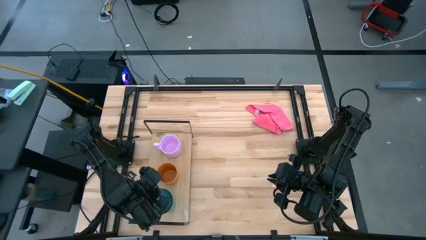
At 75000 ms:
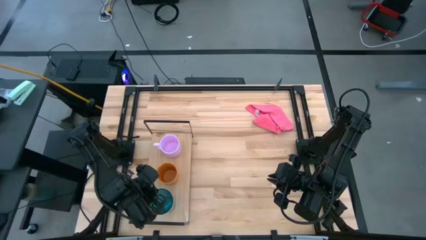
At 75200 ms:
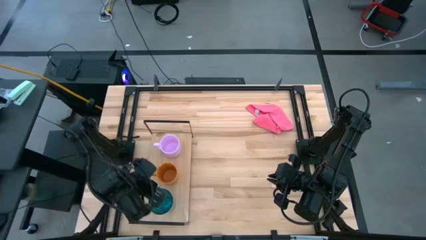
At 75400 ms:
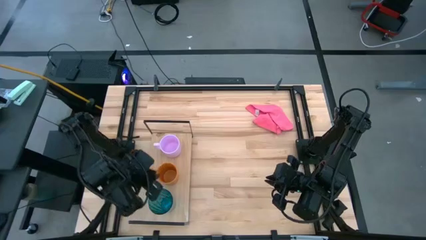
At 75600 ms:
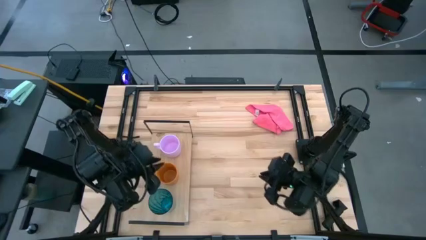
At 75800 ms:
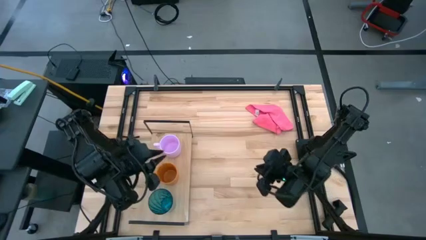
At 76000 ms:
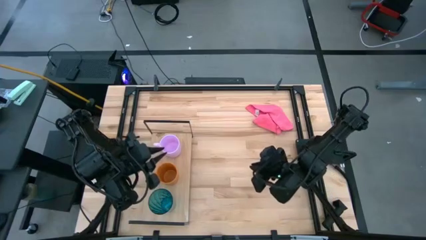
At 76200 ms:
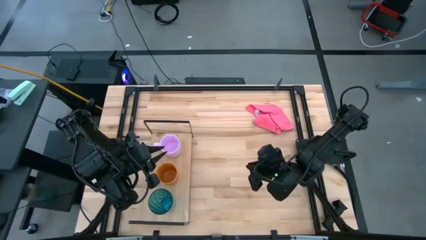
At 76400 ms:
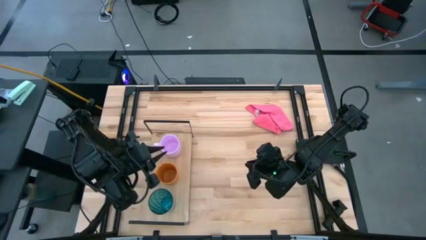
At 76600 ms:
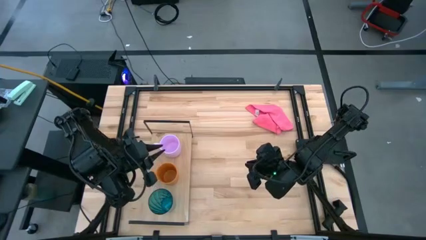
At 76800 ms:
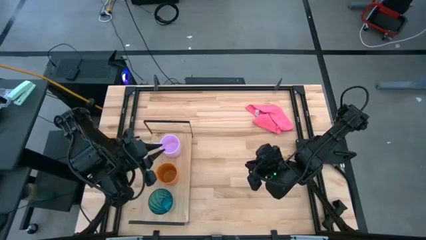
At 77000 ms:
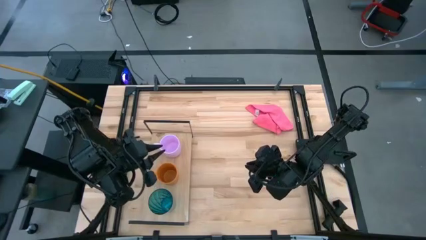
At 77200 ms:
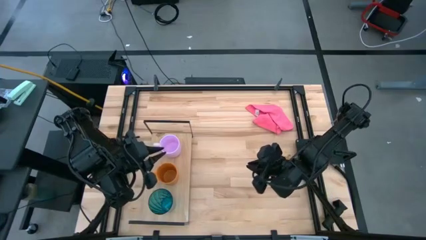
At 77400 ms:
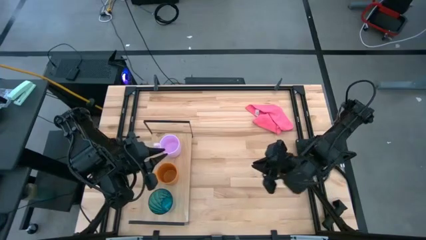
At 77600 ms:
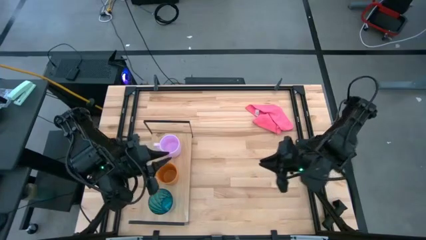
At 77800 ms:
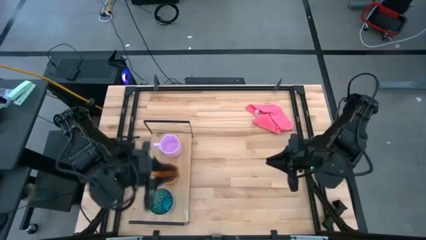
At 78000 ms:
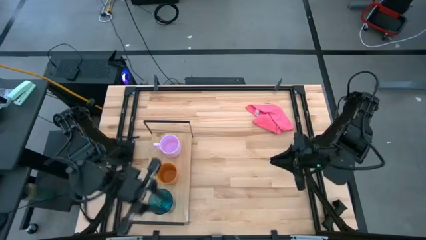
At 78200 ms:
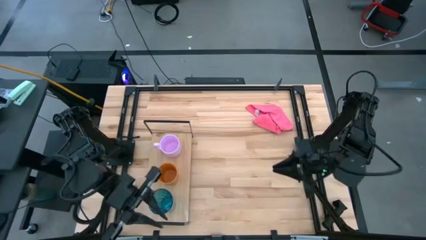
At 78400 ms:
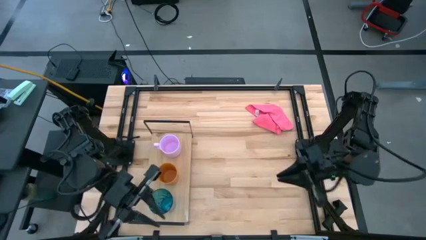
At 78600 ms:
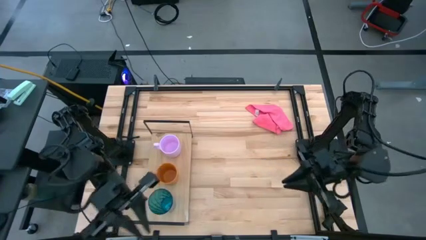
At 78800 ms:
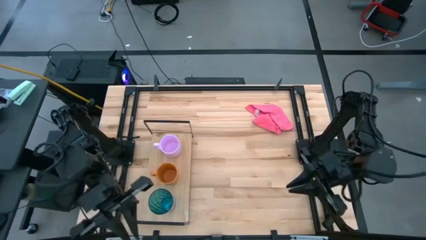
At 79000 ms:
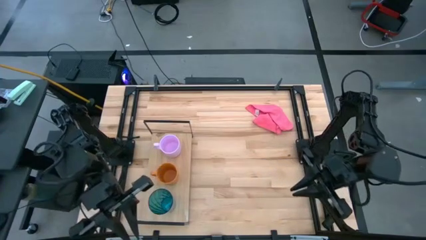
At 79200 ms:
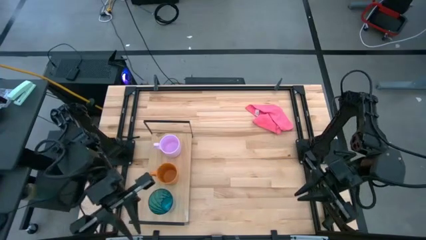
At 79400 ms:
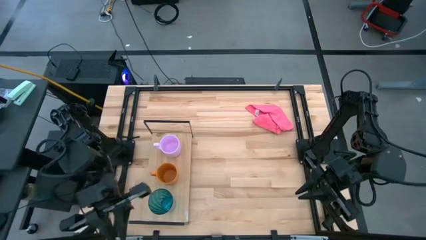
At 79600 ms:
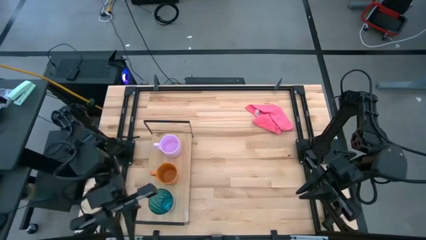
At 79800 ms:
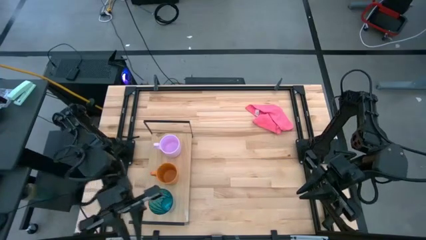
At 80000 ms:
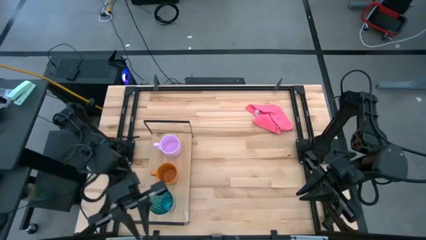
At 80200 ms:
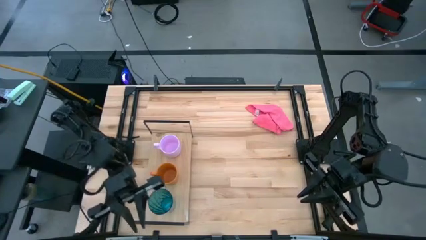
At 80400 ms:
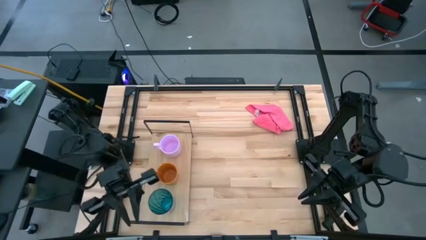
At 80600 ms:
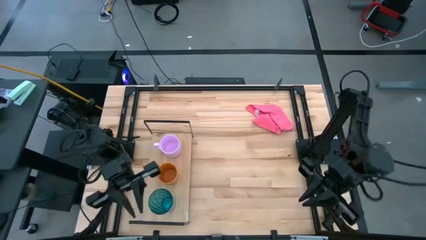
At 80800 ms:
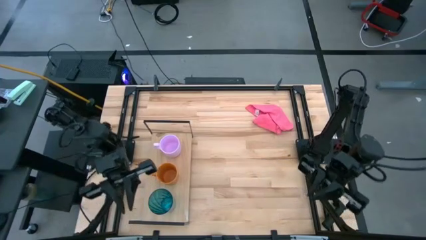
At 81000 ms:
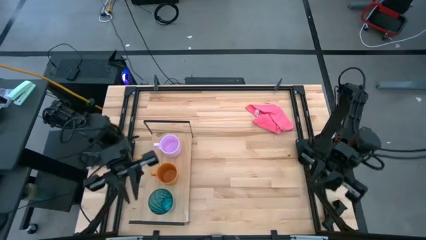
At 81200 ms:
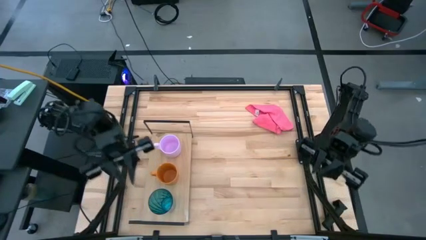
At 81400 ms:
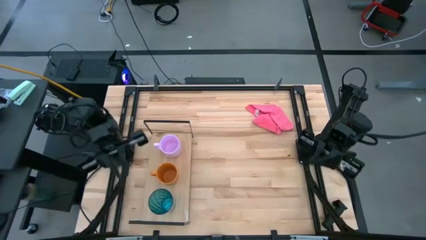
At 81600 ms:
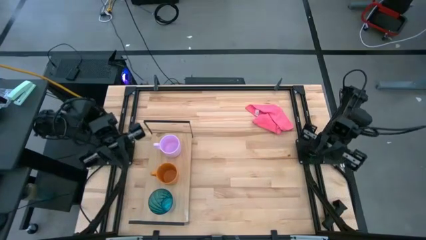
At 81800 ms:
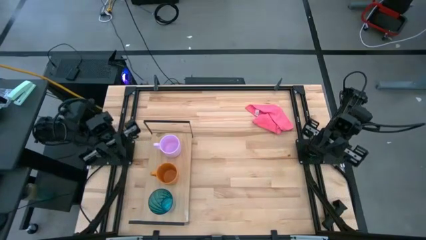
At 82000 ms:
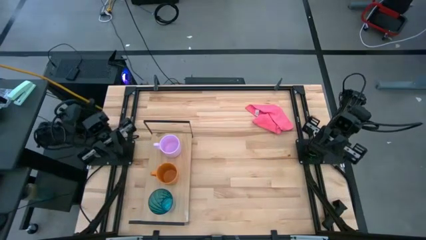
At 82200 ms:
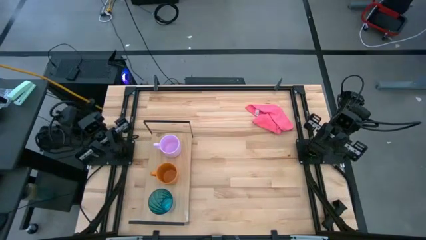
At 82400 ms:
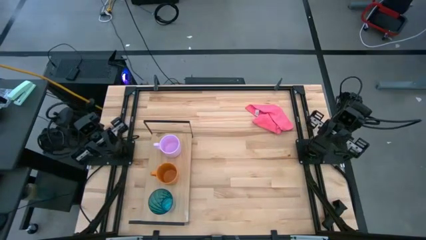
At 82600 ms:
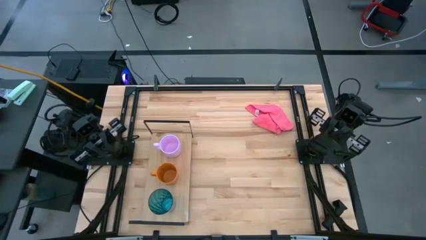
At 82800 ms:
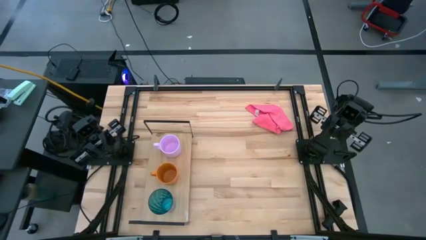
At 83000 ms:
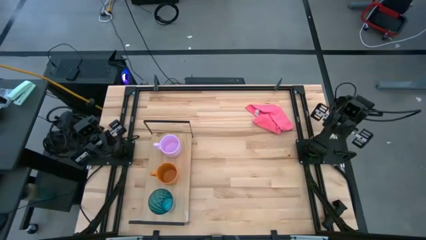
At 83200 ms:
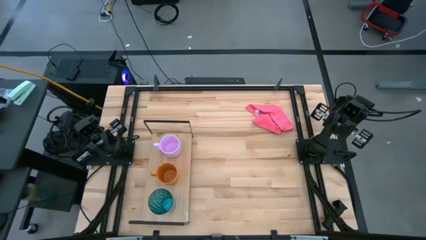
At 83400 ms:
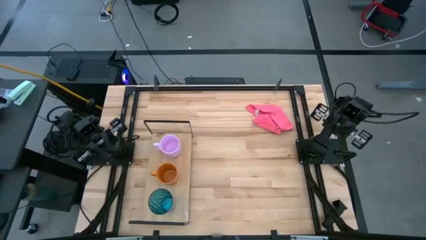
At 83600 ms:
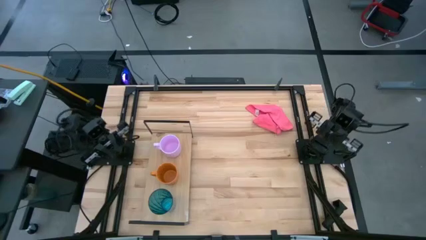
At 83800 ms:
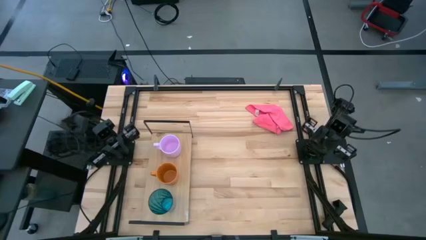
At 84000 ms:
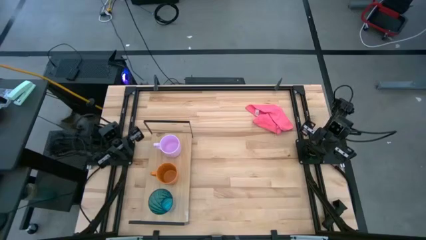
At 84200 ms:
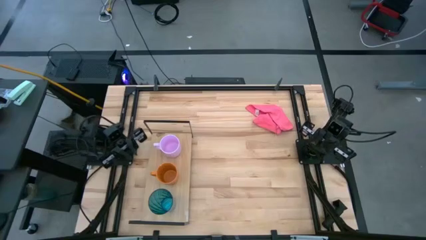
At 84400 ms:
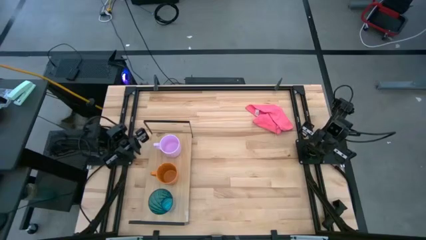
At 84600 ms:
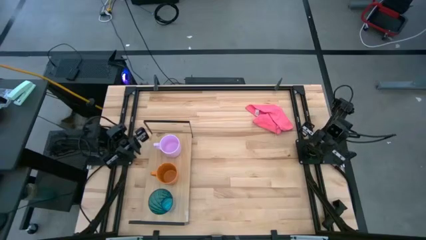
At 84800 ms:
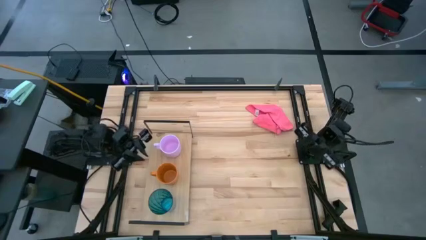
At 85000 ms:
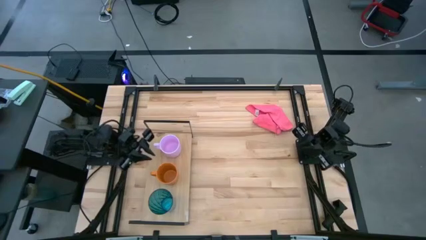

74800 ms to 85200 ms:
Task: Stack small to large cups/mugs on shelf
Return to home position
